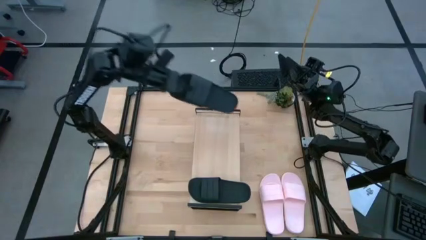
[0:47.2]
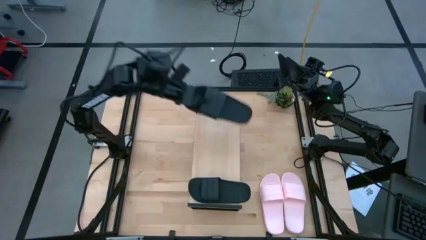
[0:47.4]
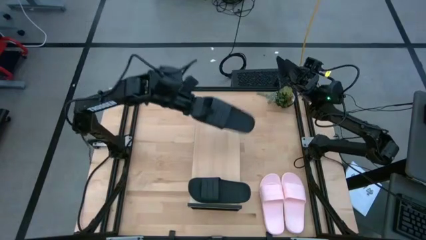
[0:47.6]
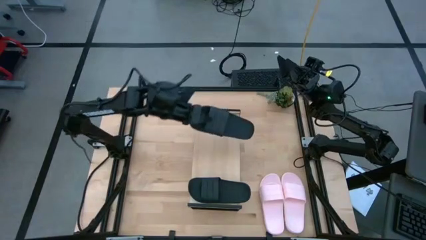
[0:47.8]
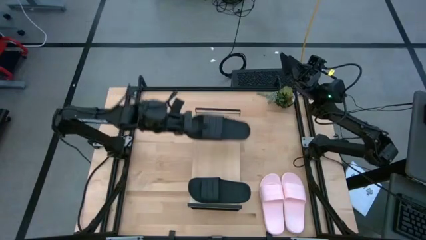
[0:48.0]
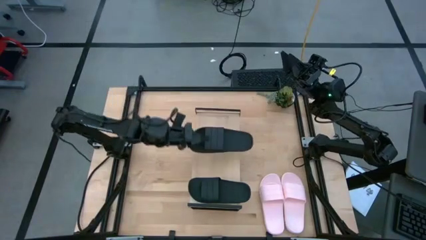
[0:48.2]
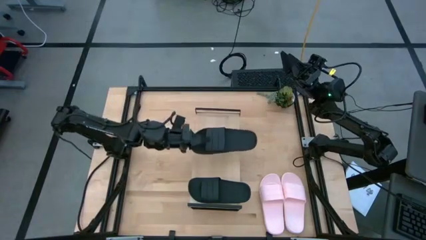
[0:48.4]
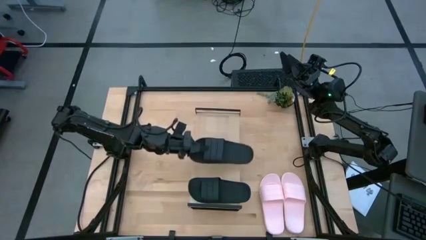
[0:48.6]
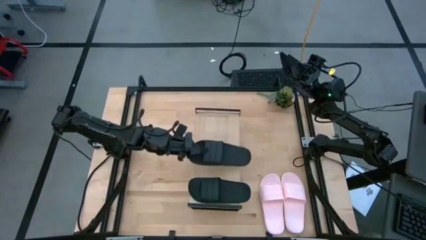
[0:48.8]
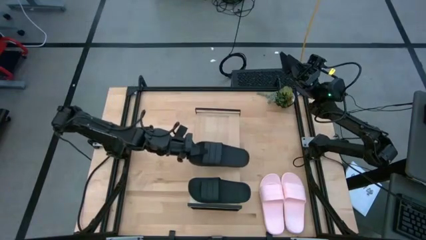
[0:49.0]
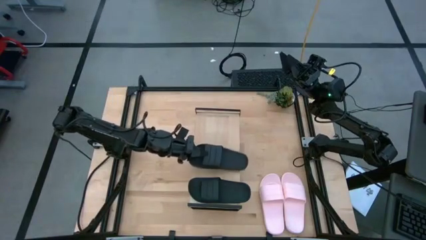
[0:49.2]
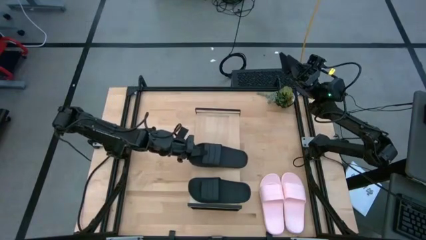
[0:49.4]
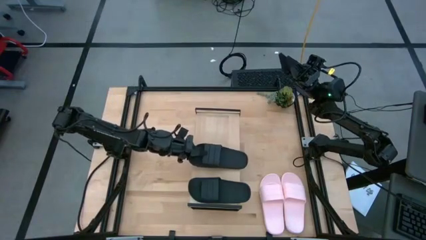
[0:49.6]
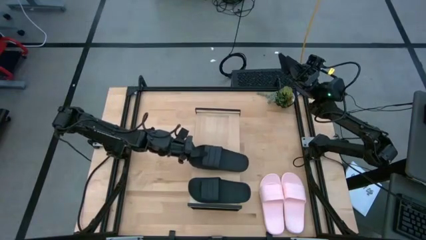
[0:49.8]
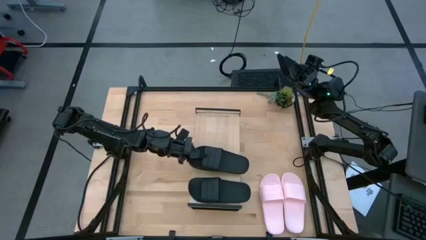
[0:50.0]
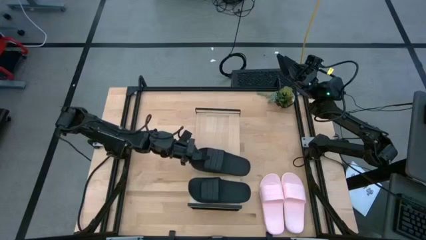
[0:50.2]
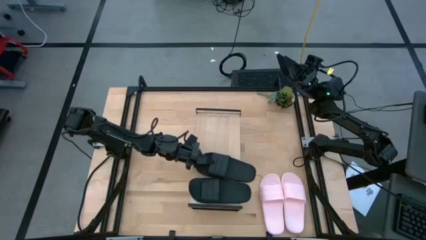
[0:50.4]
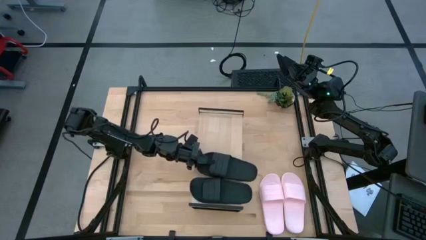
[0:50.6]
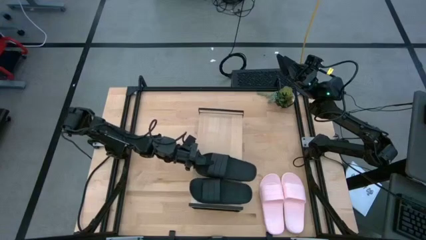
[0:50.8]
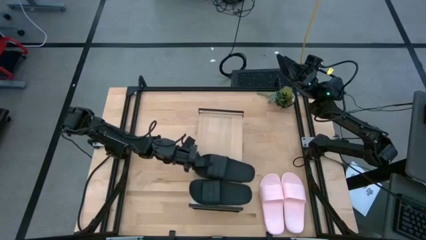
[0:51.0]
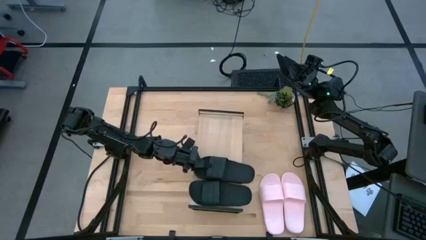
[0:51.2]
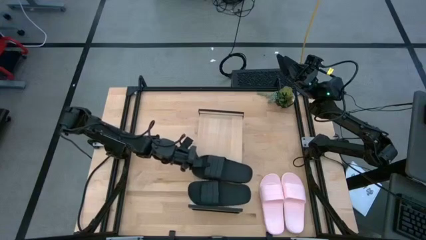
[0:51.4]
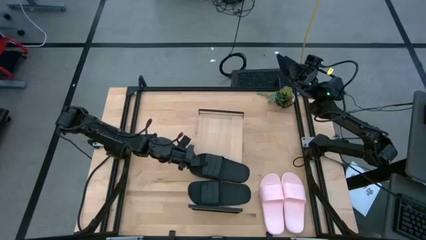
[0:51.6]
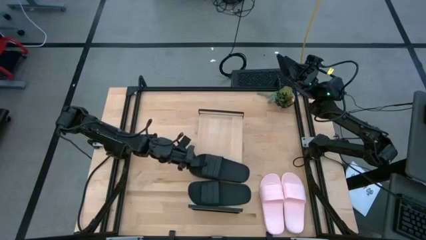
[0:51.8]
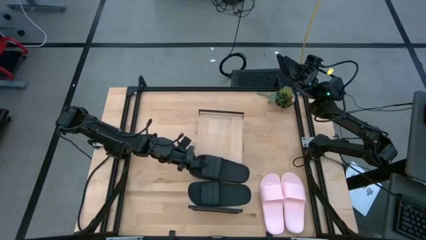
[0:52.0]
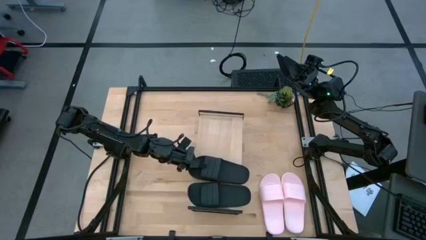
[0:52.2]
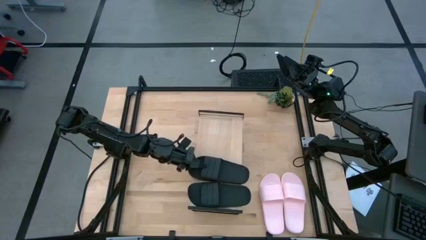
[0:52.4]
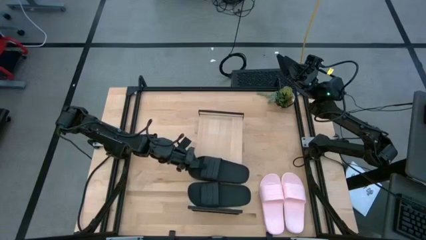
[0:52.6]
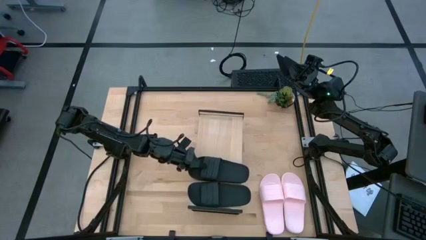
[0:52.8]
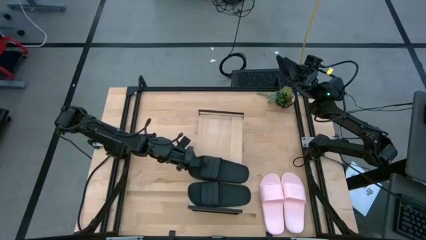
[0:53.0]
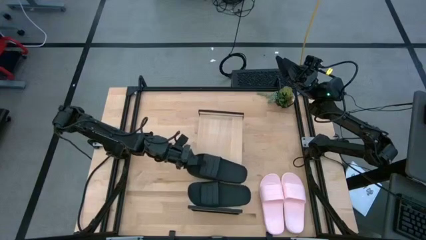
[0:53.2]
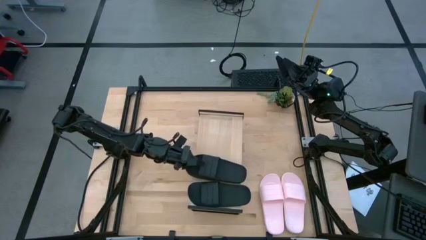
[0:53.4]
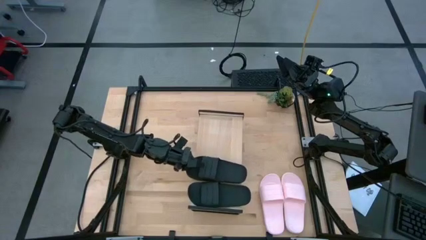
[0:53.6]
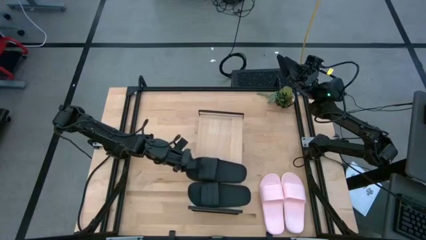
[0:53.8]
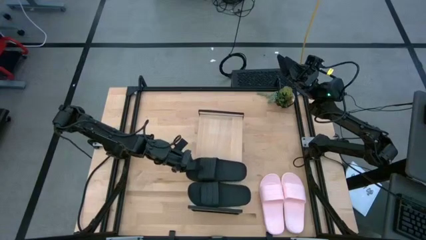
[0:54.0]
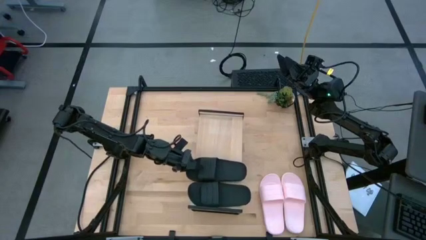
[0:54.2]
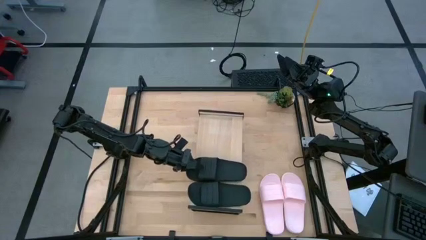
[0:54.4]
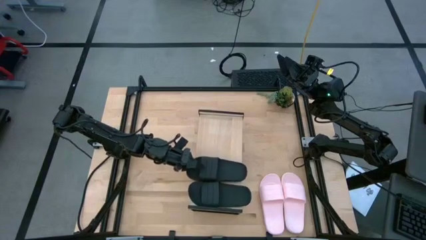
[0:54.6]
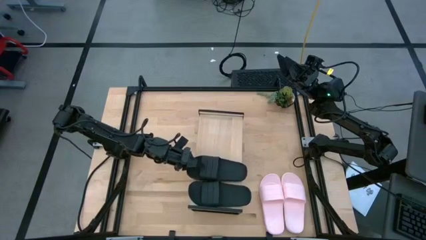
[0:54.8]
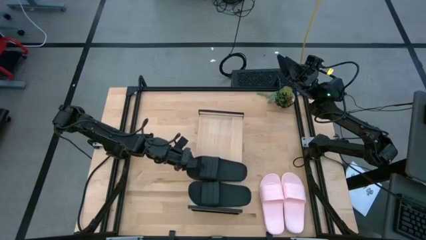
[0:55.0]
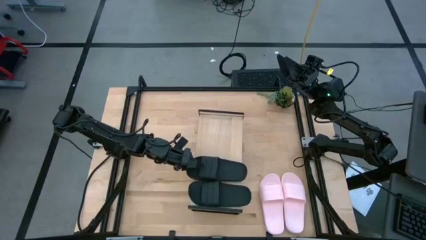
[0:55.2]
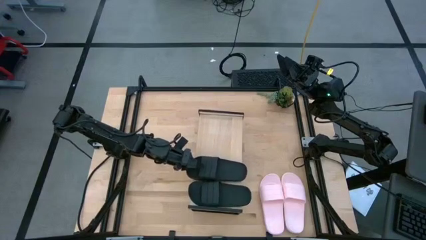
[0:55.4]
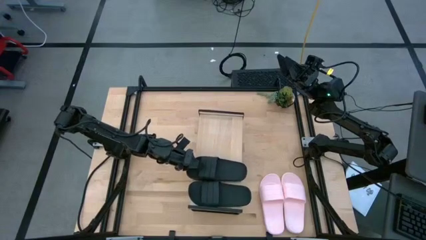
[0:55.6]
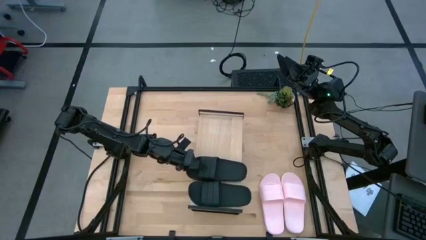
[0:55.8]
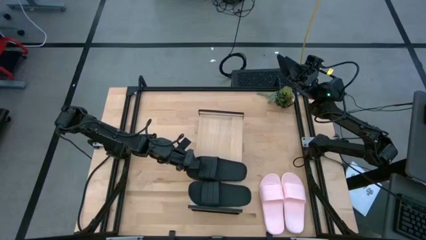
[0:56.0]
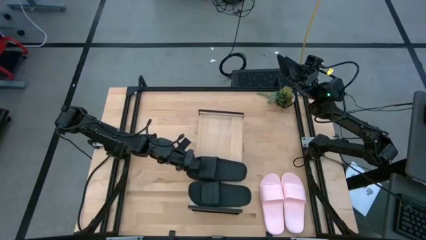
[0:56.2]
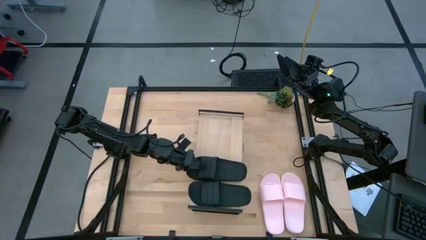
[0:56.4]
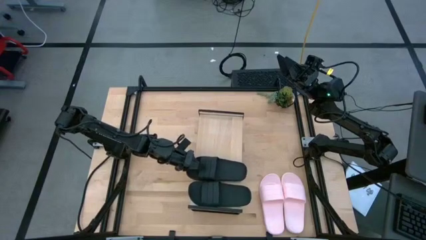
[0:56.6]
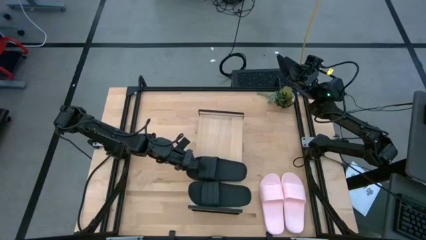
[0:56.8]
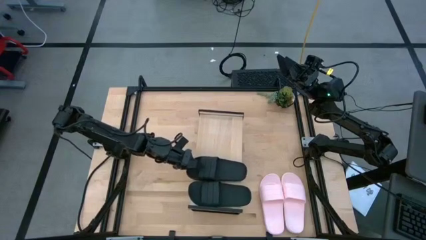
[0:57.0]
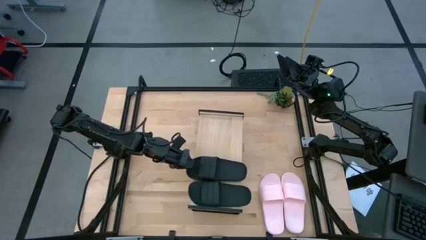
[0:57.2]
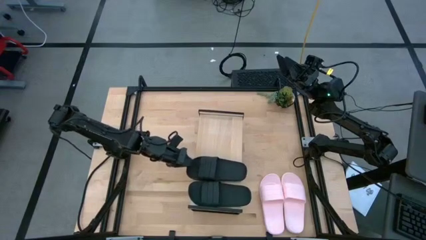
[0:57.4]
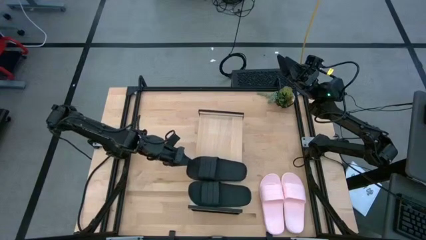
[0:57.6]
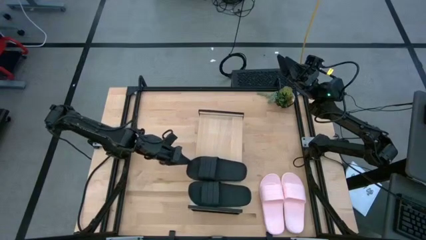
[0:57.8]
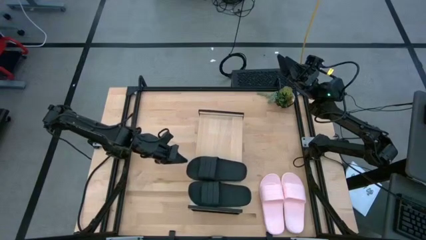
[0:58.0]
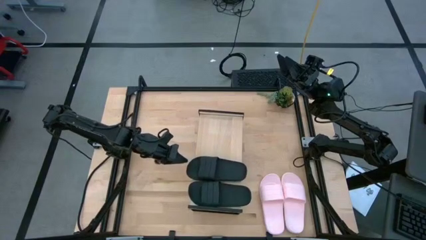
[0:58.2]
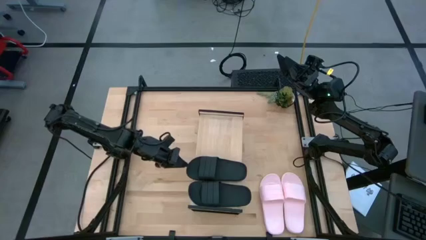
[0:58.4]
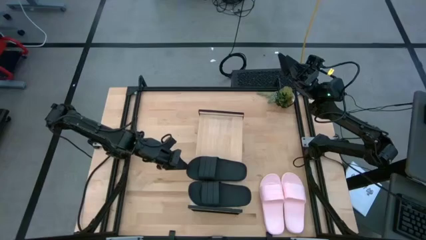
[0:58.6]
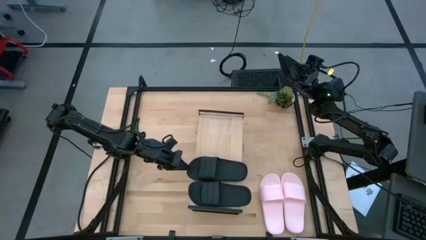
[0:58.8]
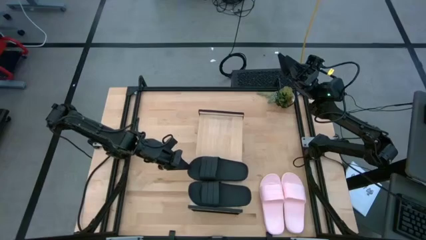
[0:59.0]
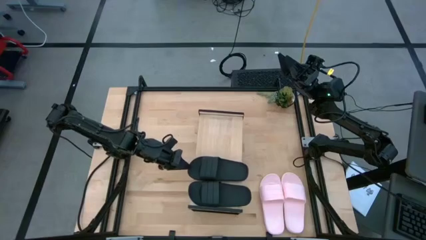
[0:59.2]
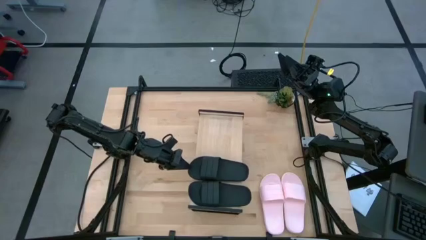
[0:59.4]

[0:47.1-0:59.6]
Task: Pick and place slides into the shelf
Put the black slipper on the shelf

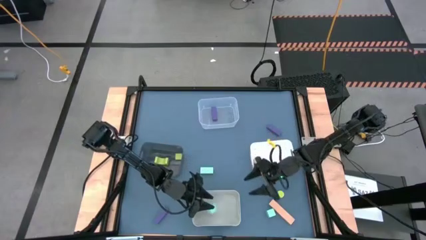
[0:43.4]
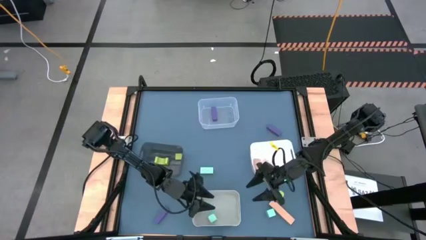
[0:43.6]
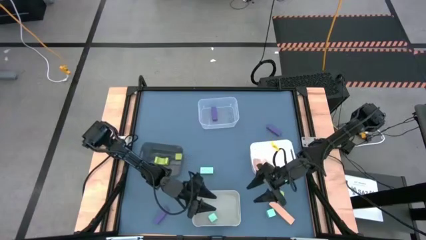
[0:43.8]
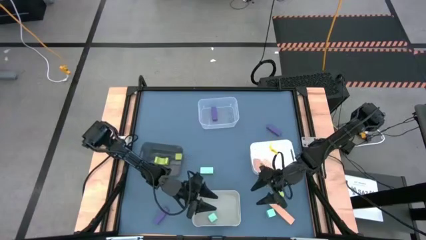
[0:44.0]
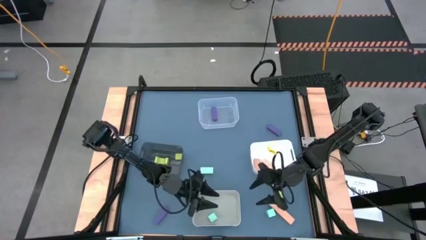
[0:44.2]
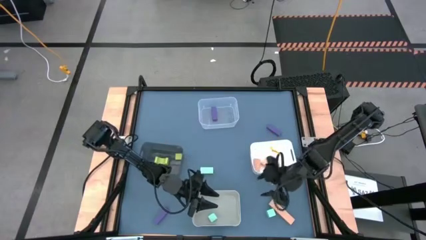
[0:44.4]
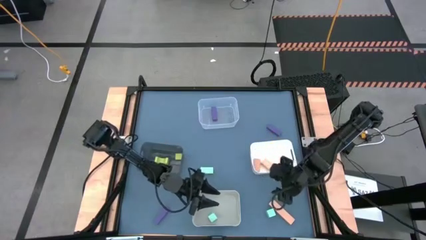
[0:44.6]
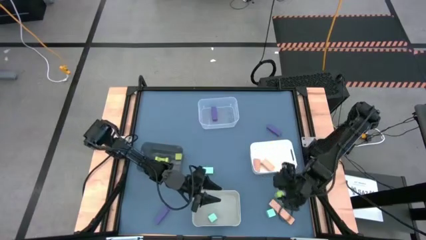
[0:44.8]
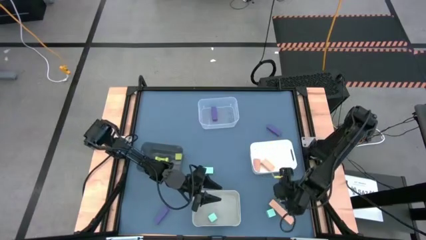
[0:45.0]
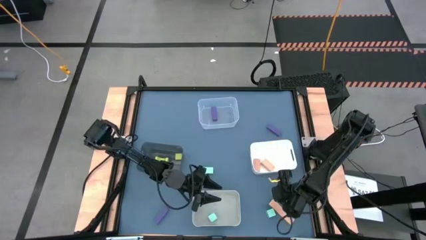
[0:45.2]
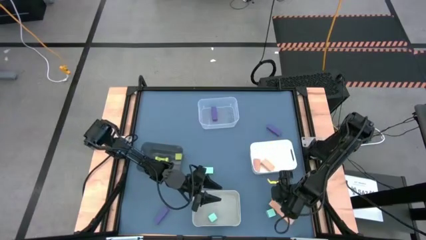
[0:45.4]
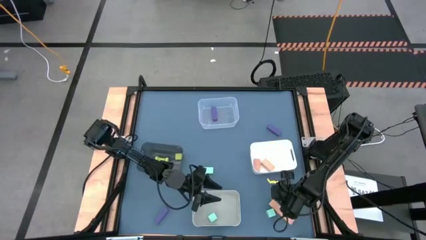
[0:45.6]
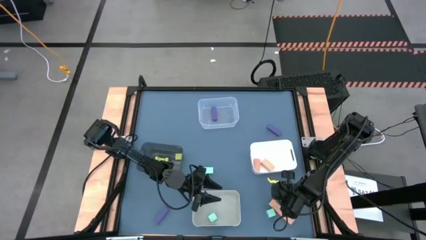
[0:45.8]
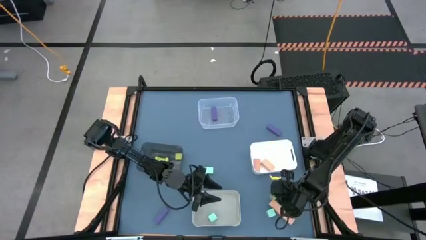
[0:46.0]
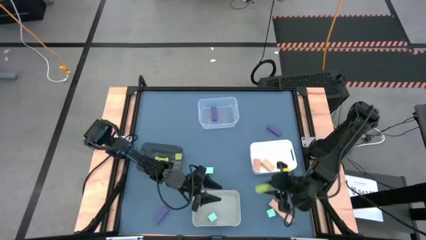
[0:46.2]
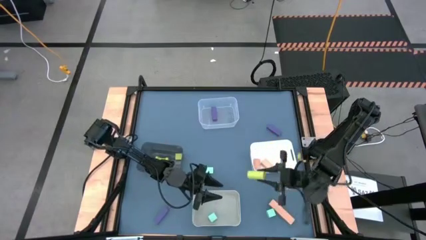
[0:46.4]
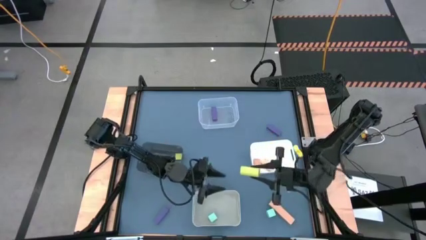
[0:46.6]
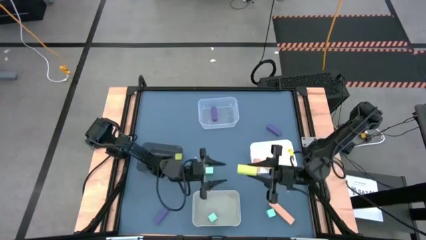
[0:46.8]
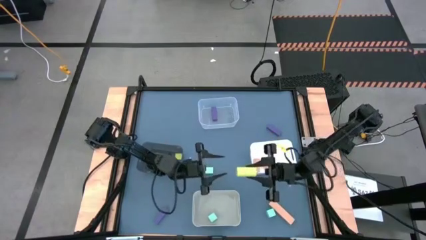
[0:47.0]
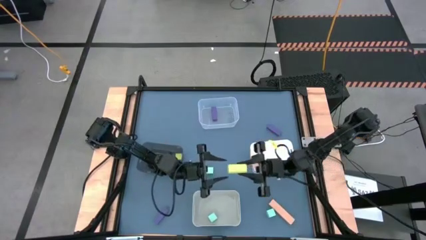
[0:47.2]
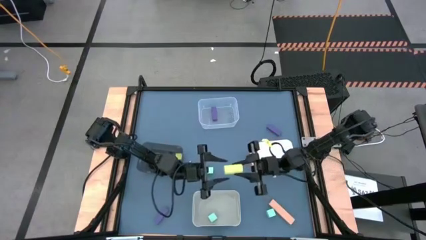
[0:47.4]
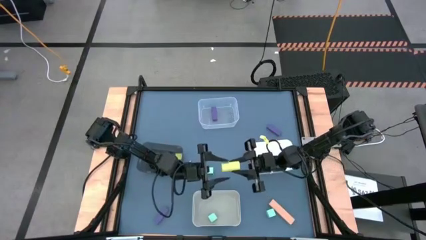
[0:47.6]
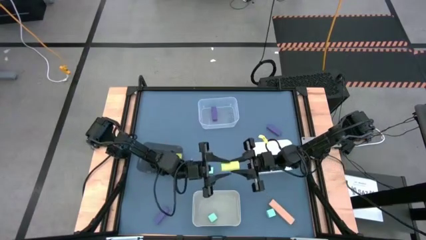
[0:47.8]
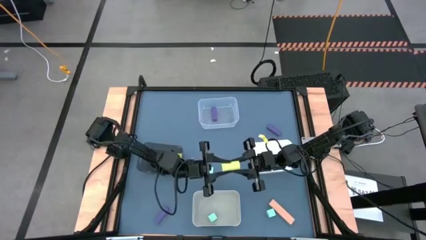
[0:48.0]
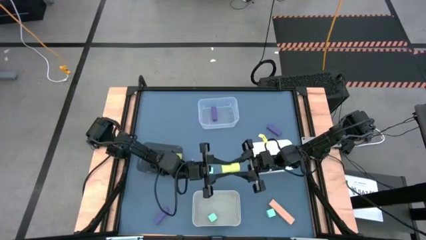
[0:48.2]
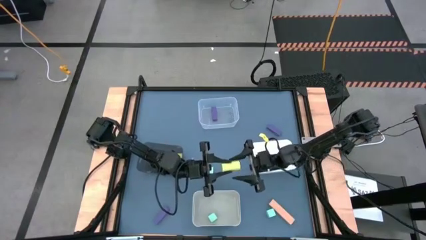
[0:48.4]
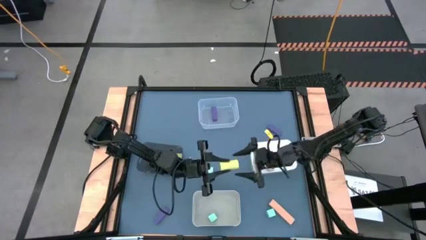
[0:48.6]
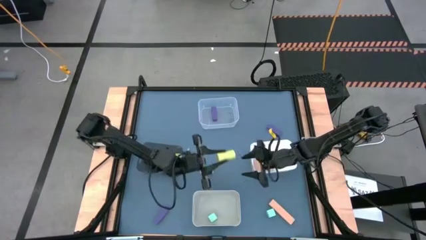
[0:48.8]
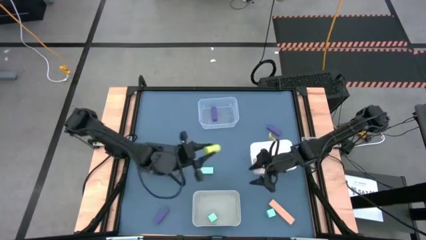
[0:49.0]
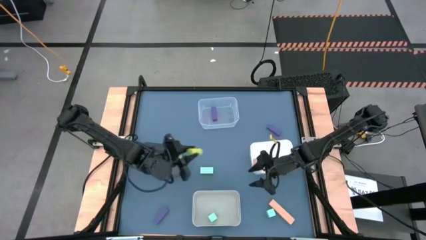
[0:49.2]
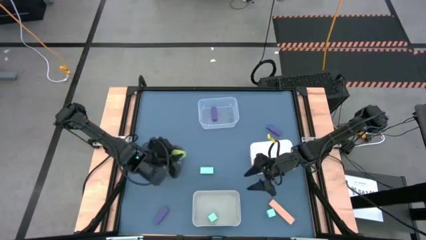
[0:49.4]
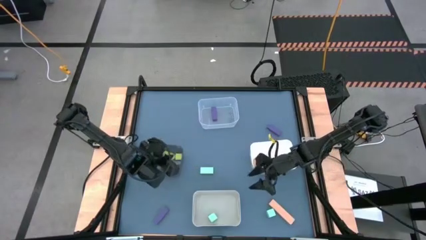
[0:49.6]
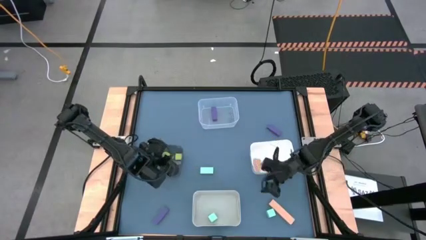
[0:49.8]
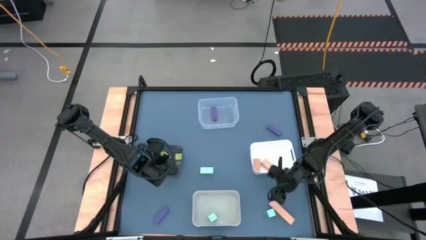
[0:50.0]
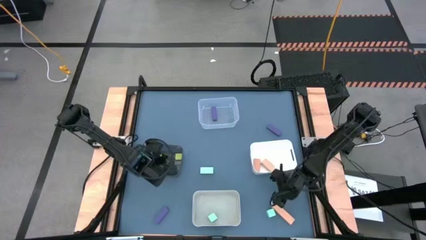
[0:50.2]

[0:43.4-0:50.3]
Task: Sort & place blocks by color
Put the green block into the black bin
